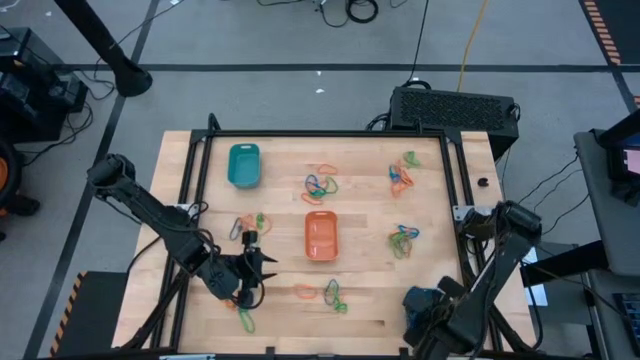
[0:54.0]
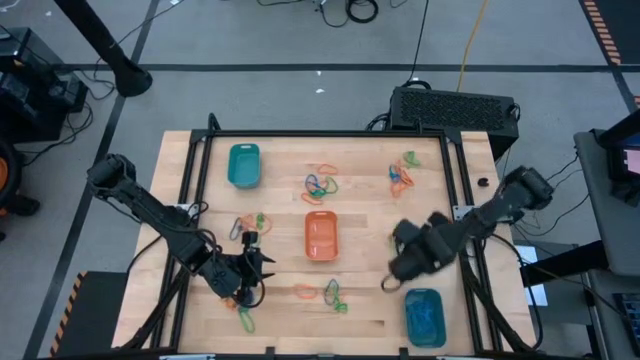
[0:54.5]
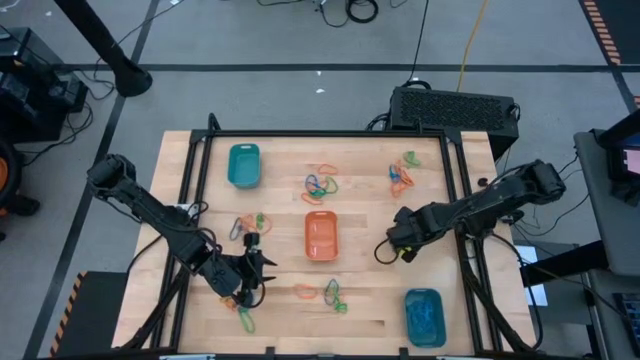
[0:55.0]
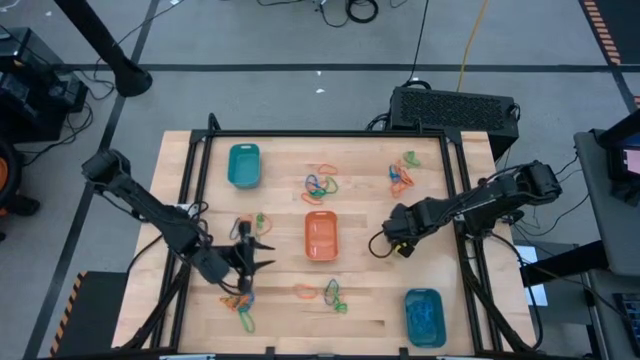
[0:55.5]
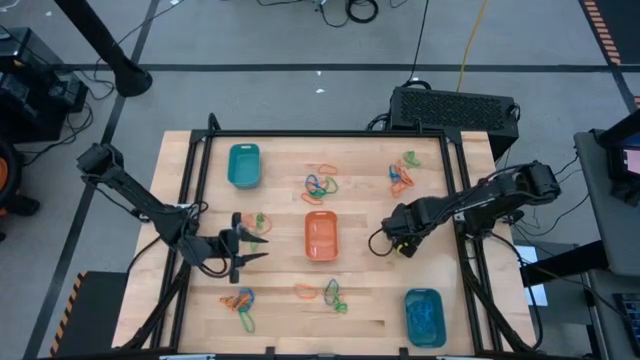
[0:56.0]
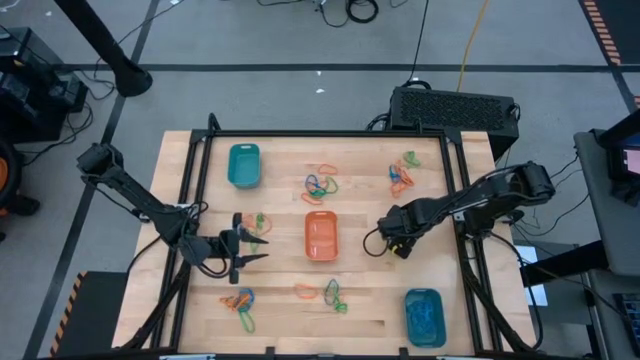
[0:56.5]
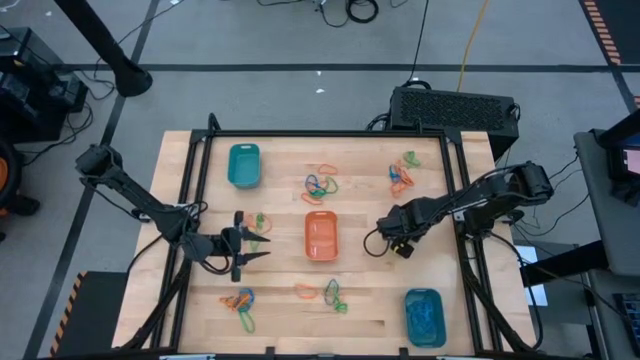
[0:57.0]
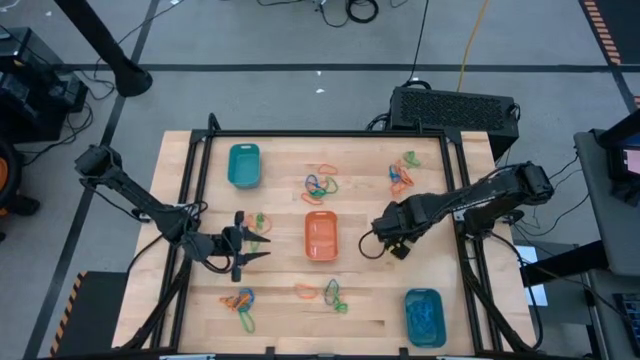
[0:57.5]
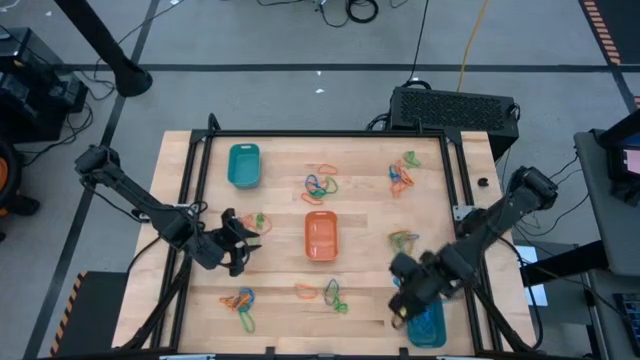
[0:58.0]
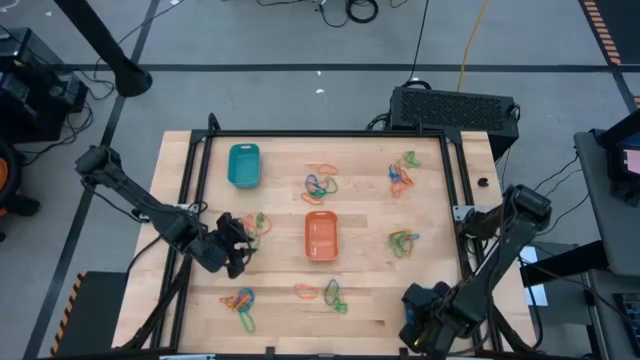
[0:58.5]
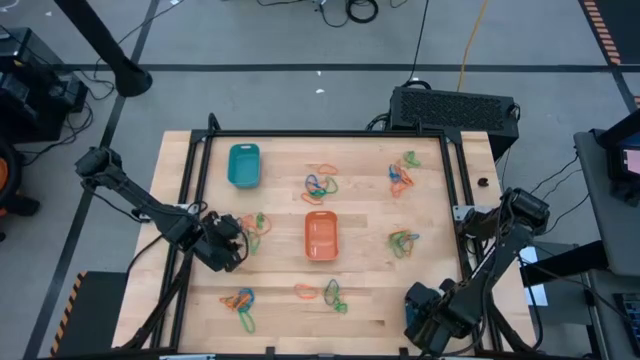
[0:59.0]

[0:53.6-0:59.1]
Task: Sort rubber bands into baskets
Put the blue rubber band into the blue bin

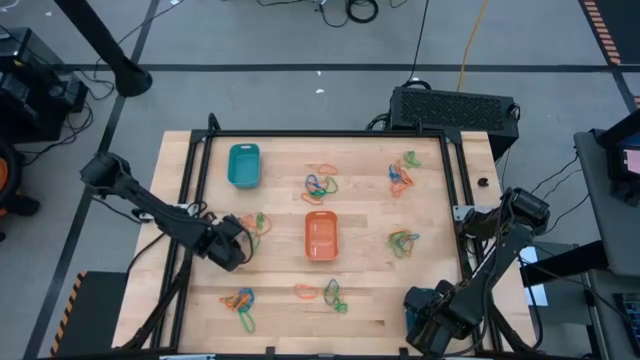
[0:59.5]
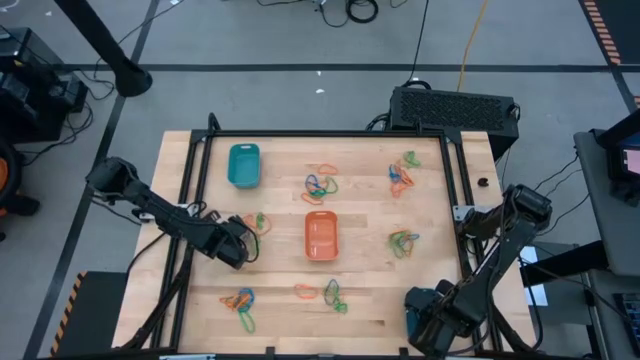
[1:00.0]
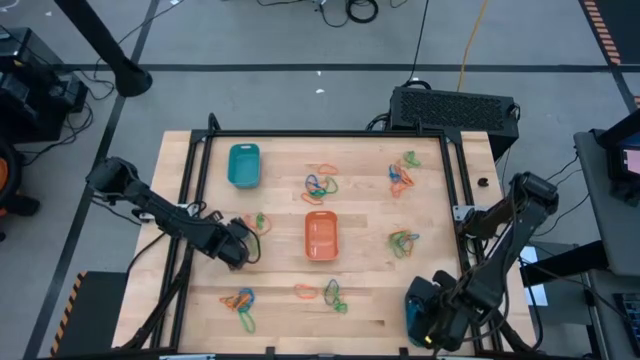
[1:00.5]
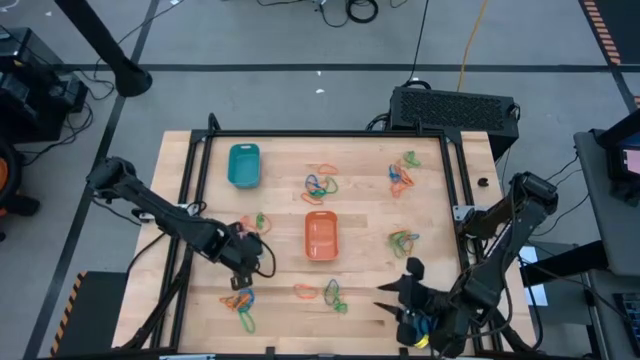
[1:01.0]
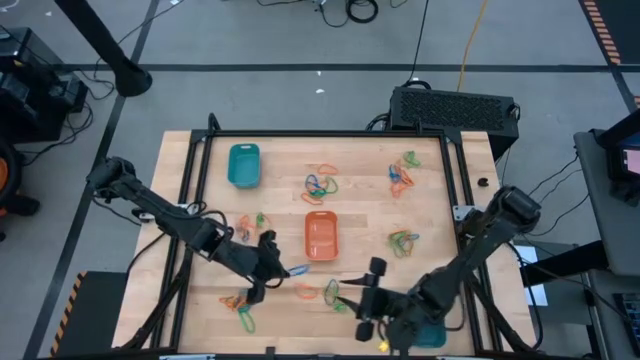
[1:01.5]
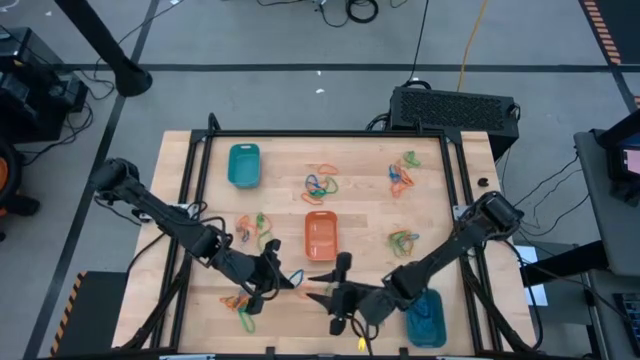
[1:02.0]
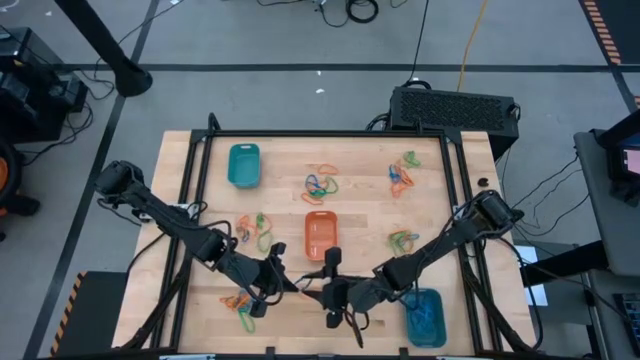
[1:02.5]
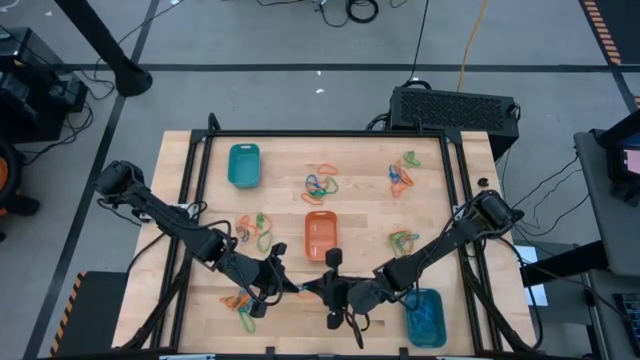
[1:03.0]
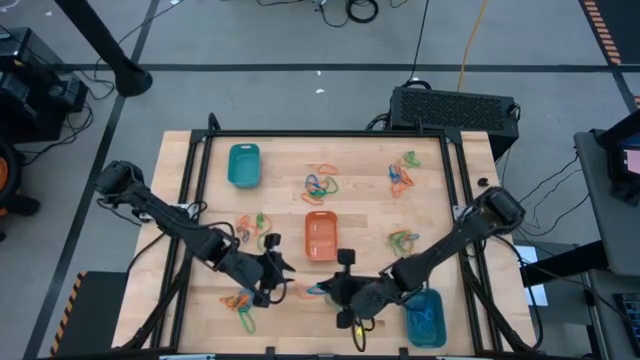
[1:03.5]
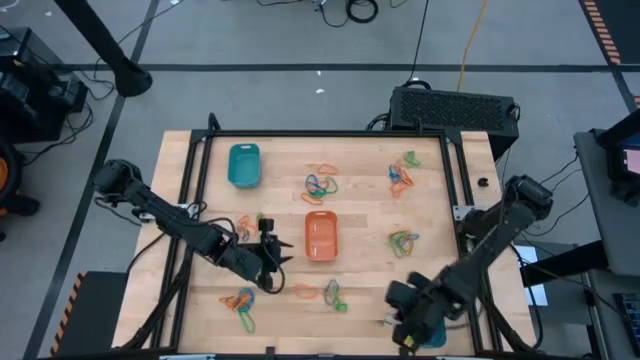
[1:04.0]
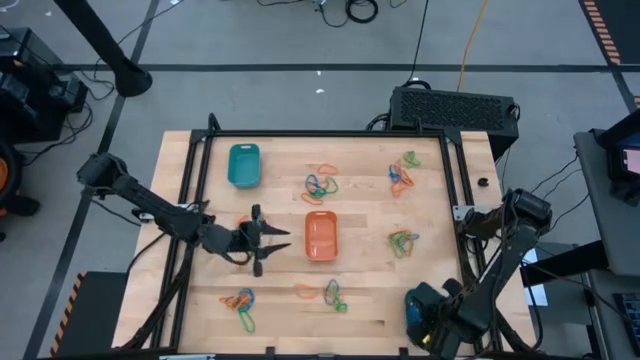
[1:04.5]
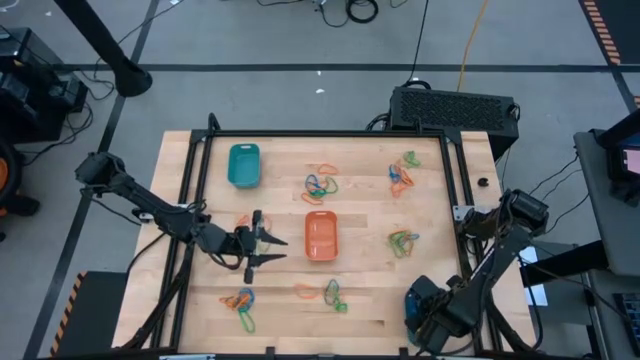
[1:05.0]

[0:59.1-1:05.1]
Put the blue rubber band into the blue bin

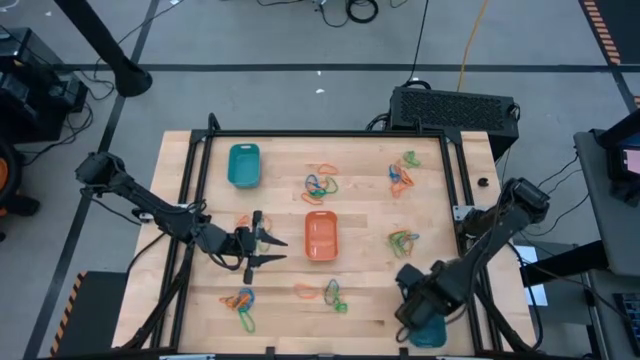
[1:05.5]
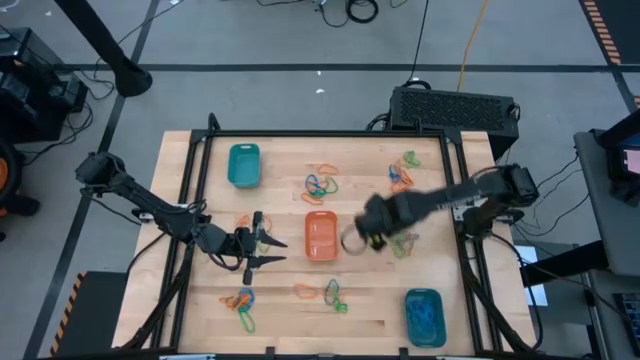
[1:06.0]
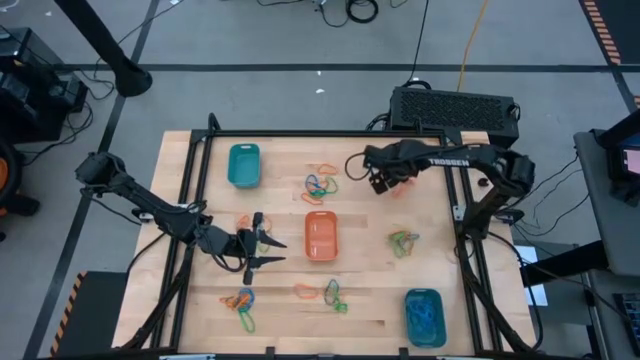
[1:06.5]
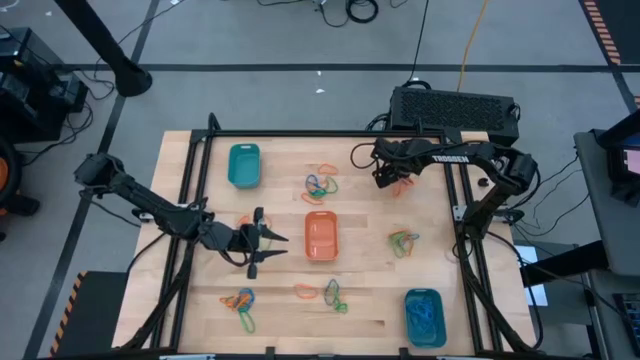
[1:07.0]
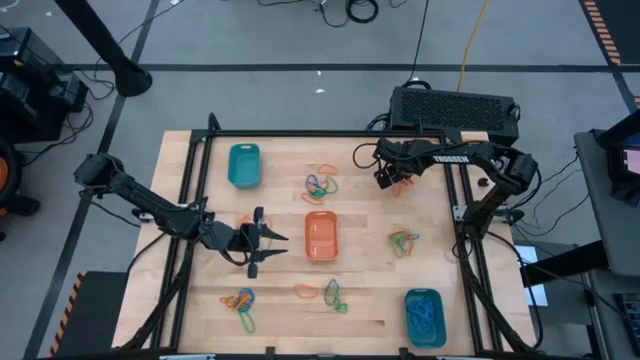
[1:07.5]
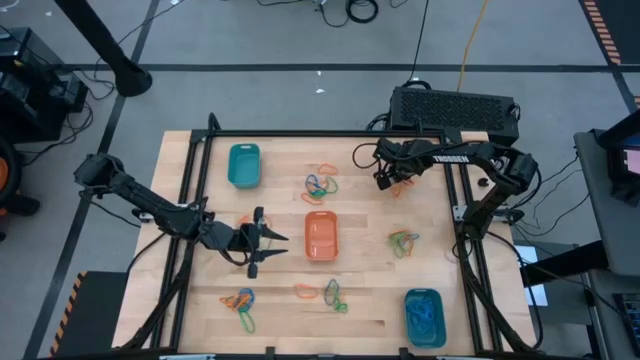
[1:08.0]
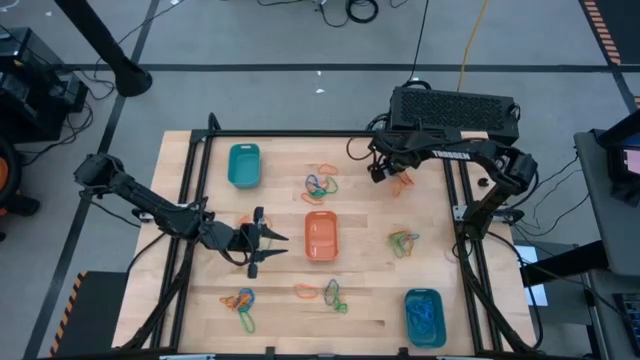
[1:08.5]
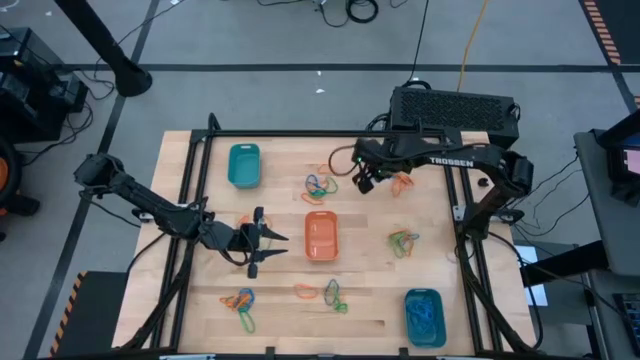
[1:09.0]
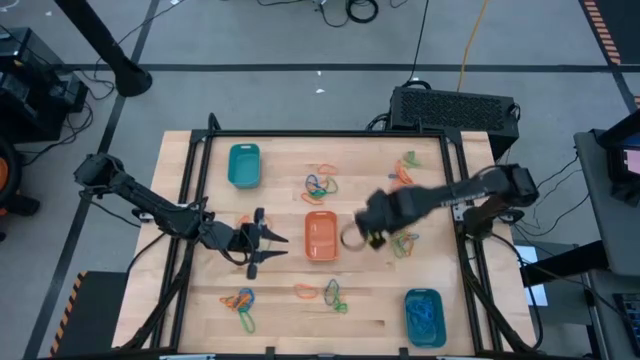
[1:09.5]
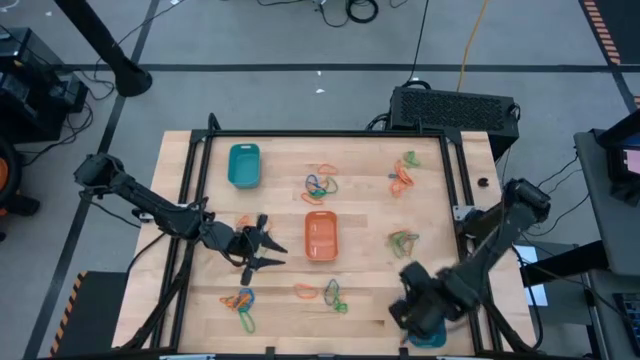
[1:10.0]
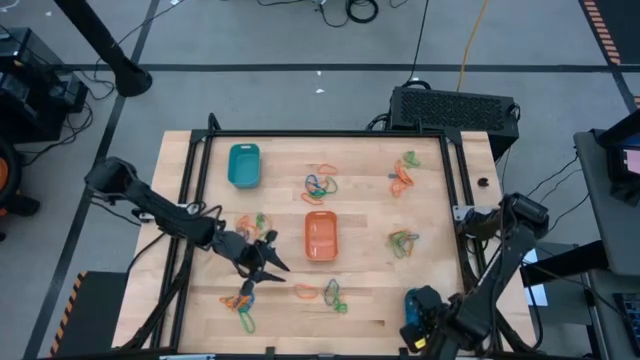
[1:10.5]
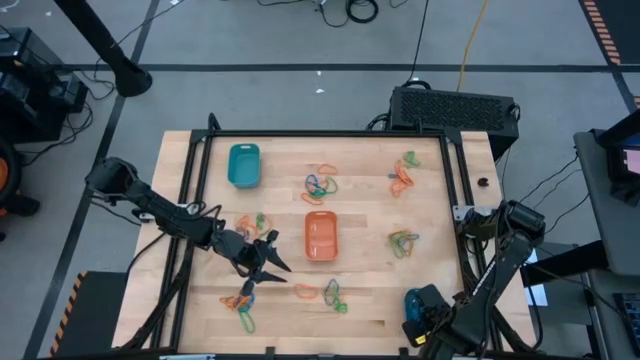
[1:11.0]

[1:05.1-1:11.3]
Put the blue rubber band into the blue bin

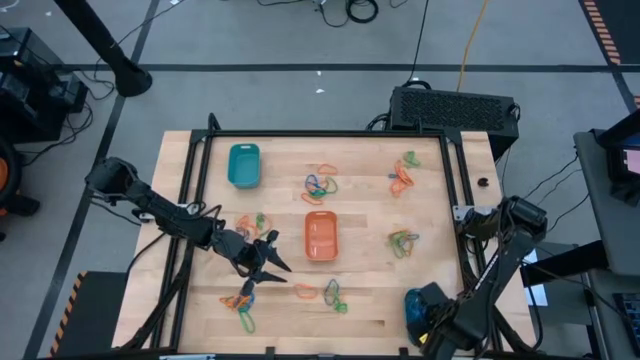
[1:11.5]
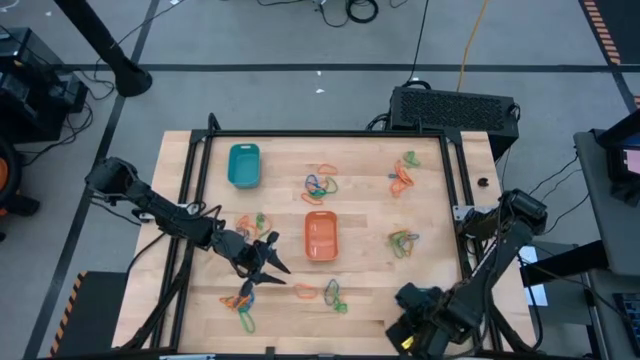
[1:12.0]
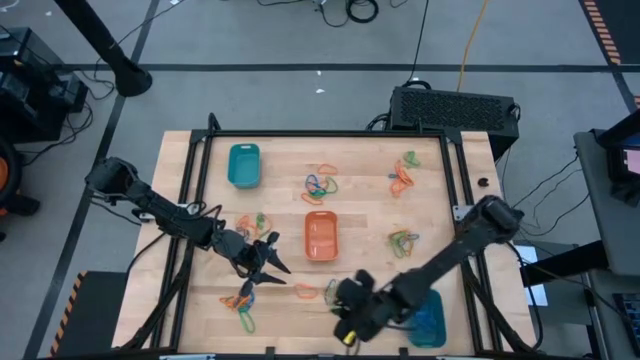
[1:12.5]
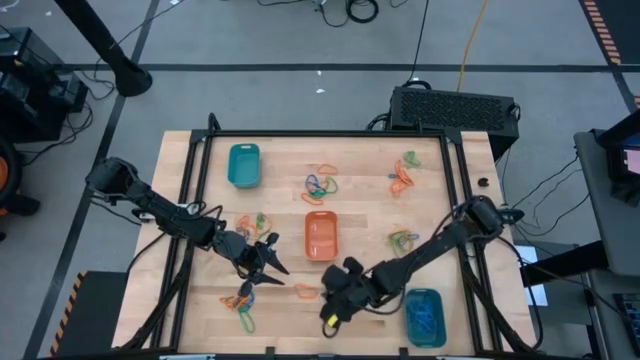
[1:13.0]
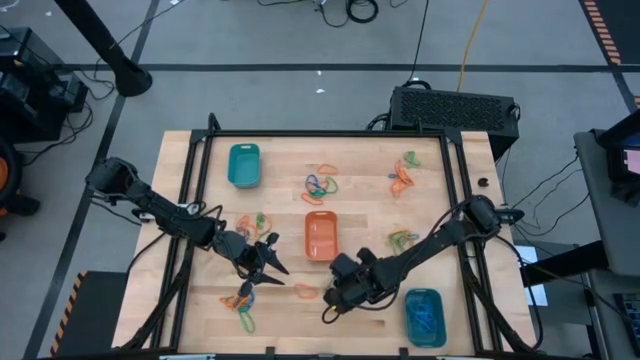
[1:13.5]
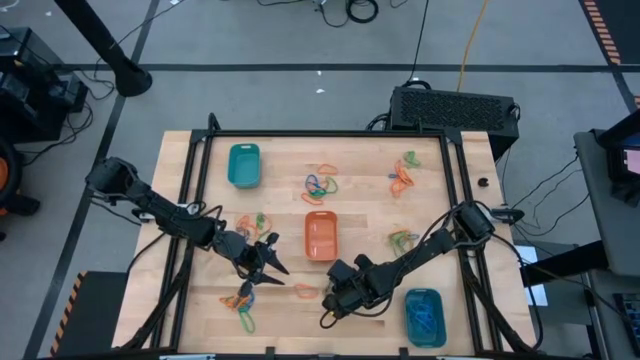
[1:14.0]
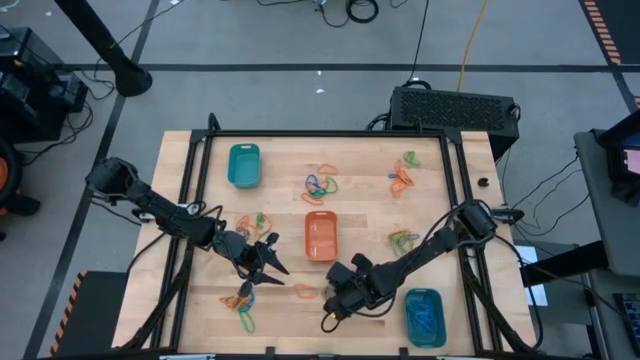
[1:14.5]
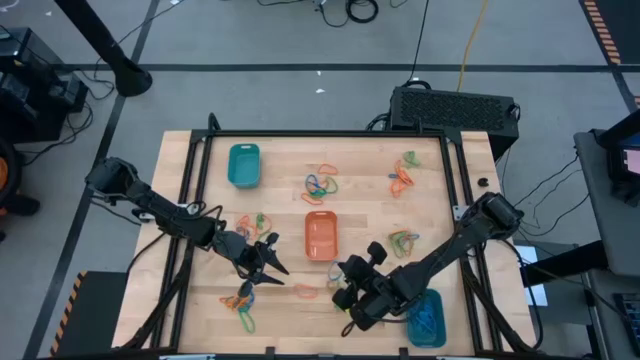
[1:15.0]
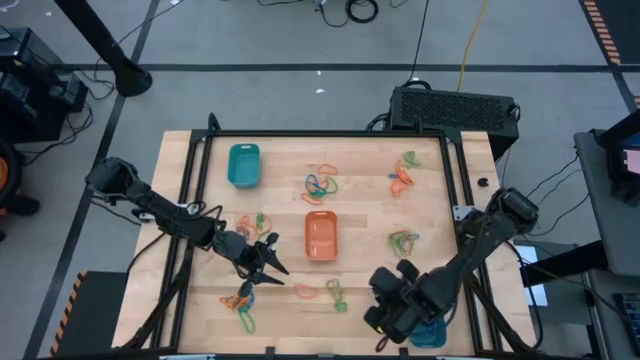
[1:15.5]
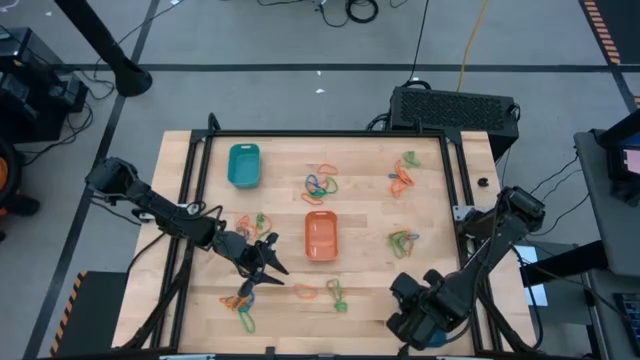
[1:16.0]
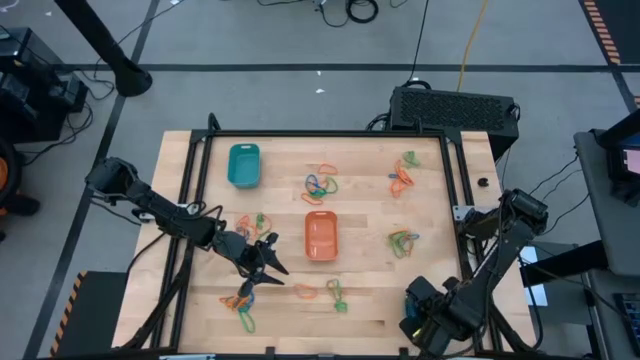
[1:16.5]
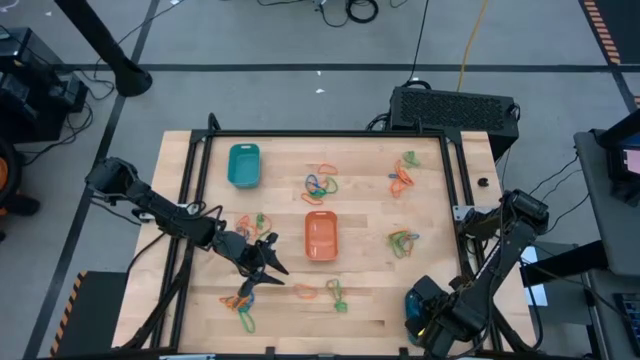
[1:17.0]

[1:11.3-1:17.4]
Put the blue rubber band into the blue bin
